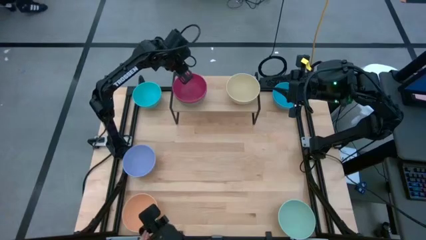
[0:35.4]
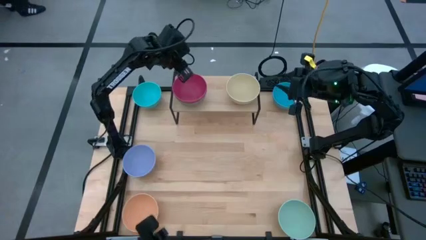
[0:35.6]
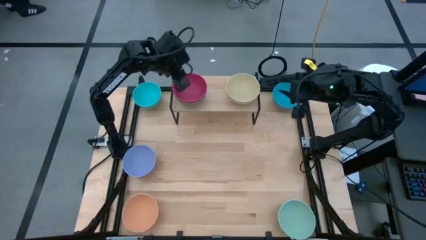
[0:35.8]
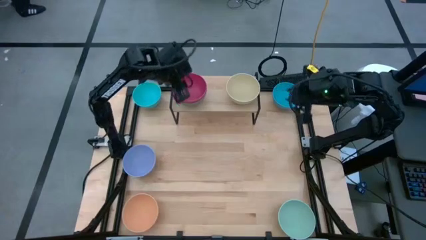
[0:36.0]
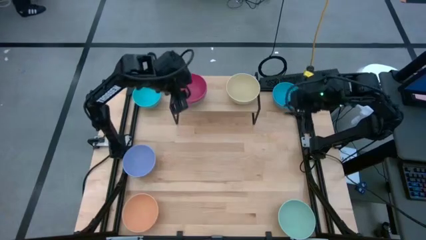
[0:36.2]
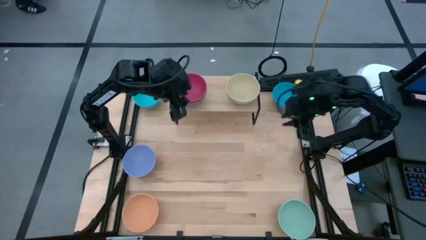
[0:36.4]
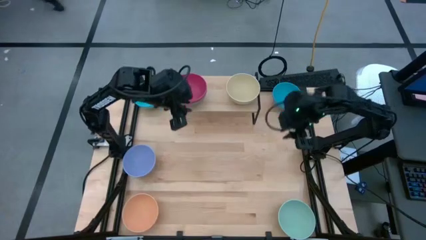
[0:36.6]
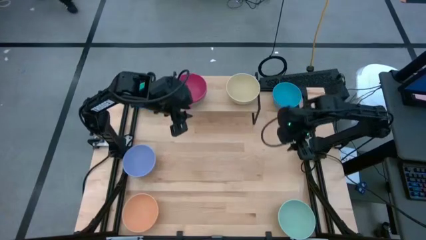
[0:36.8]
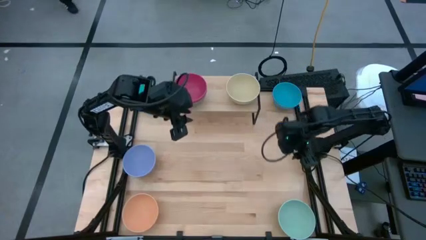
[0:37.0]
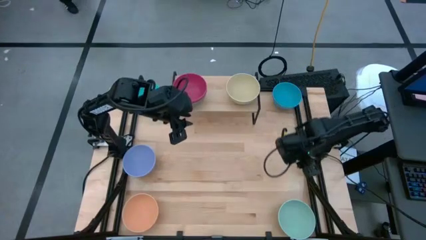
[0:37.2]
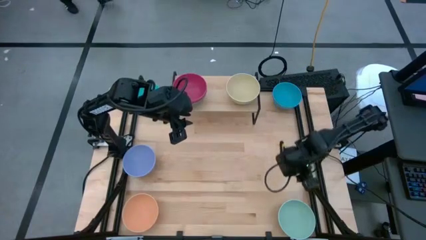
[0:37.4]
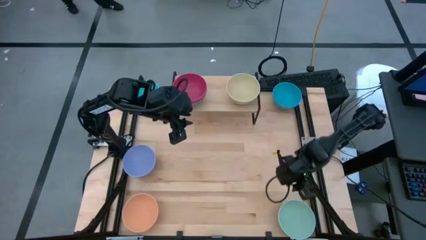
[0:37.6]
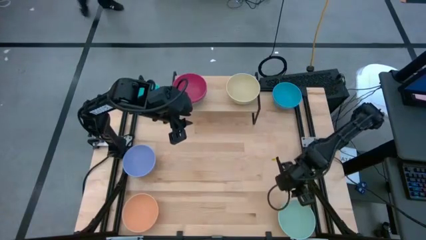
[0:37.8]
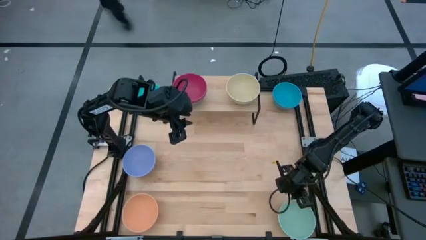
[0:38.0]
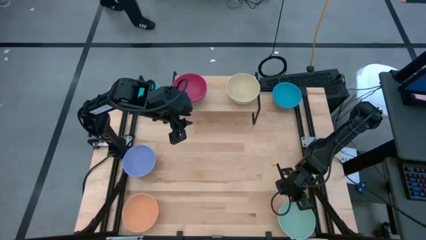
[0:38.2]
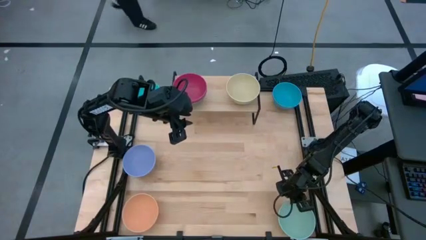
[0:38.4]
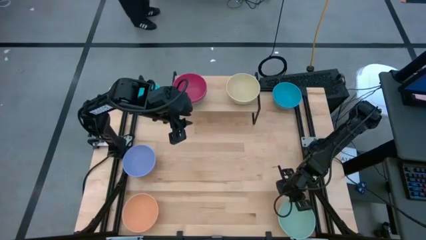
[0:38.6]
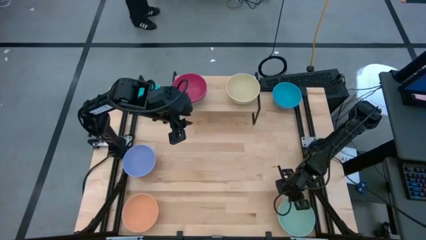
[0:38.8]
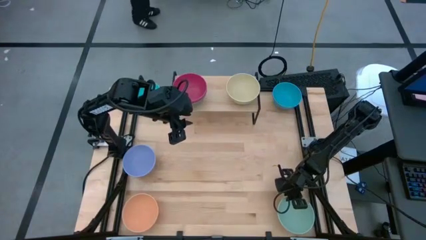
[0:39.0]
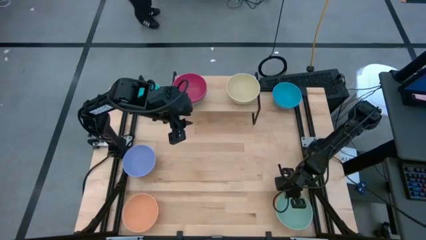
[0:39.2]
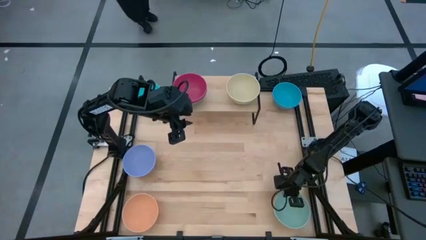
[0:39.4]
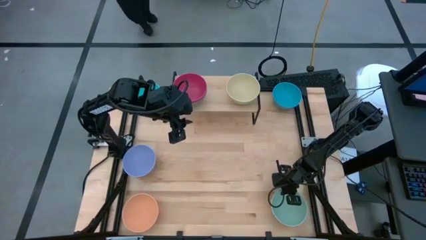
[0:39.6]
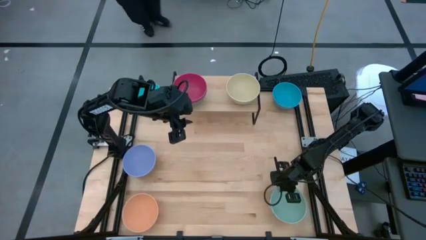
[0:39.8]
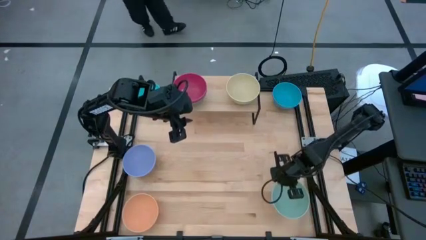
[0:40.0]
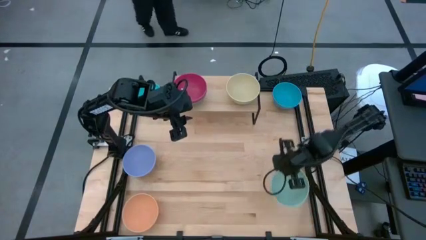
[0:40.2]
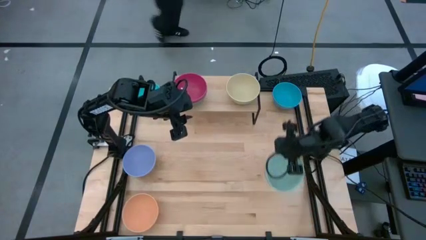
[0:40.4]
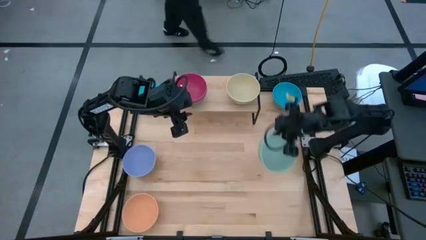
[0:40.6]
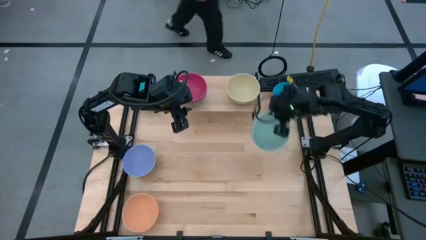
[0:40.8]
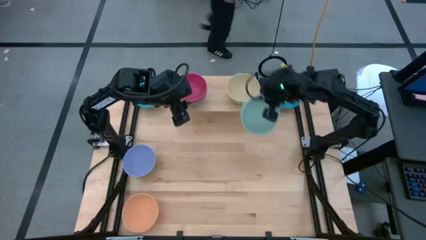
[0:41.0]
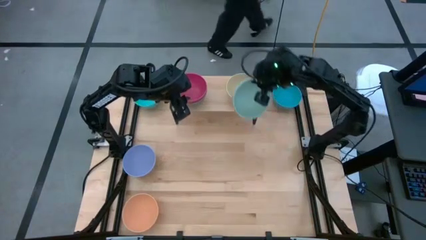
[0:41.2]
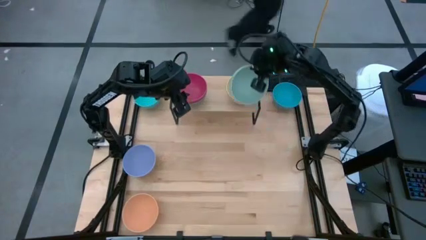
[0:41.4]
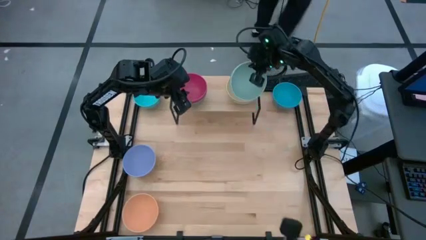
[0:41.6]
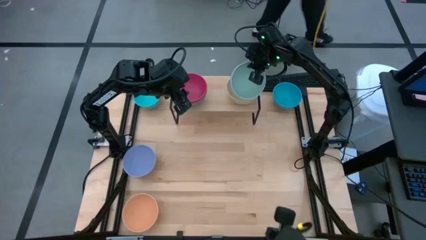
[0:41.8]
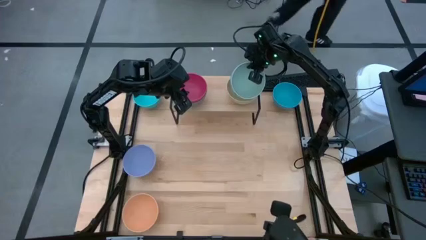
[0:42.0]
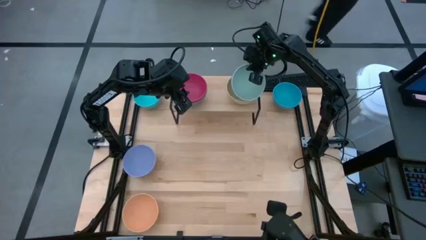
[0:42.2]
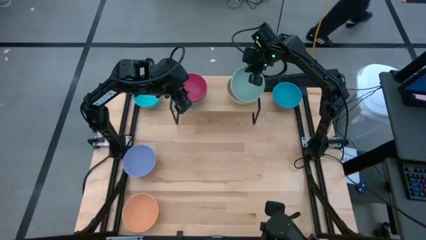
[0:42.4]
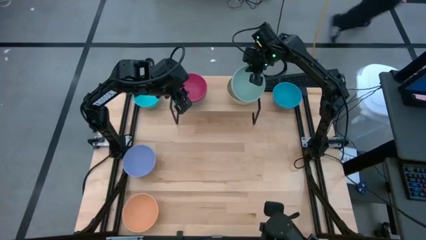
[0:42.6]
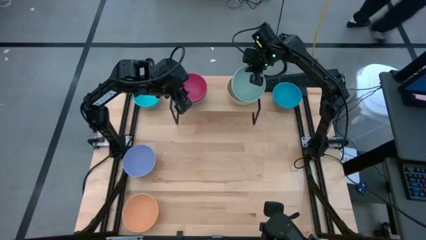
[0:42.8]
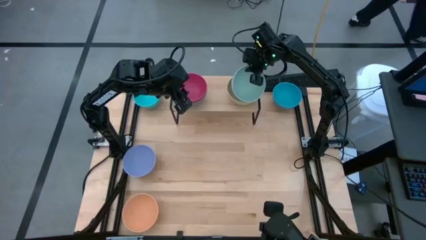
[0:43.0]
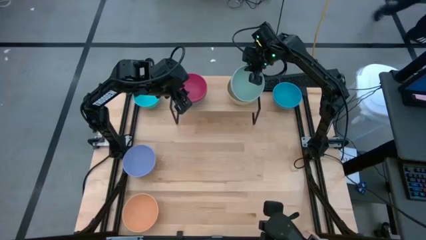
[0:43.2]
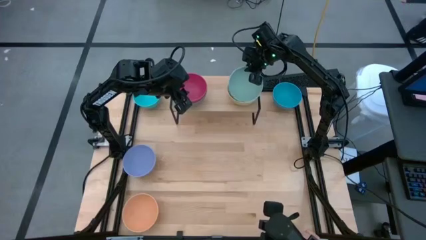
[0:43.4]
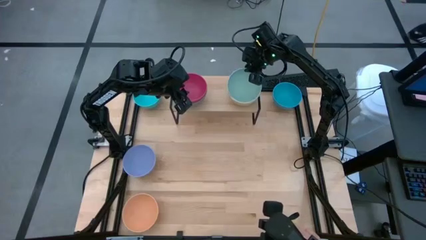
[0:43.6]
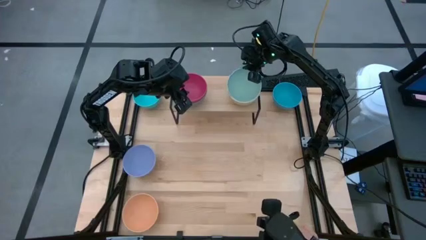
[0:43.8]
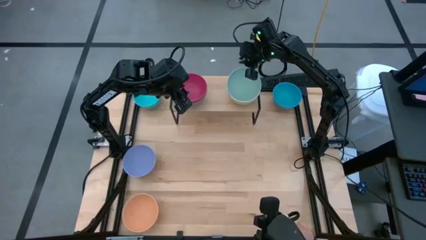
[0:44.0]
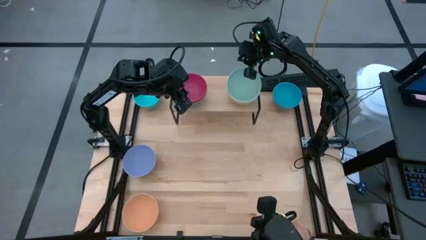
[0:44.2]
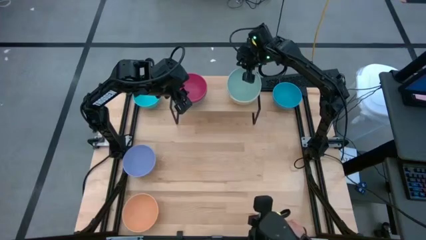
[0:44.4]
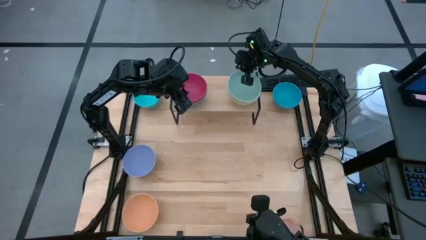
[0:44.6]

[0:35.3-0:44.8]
Task: Place and stack bowls onto a shelf
Stack the green bowl on top of the yellow bowl on the shelf

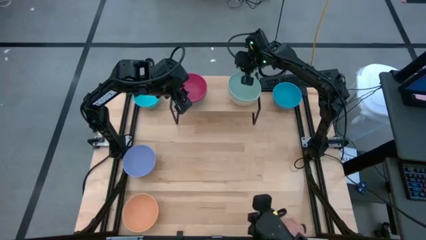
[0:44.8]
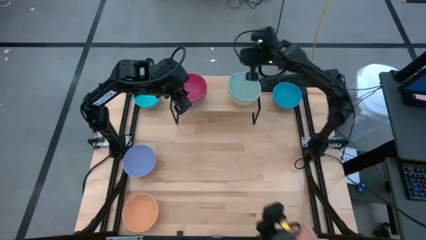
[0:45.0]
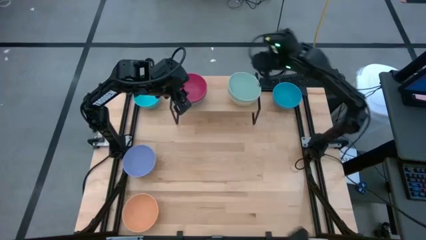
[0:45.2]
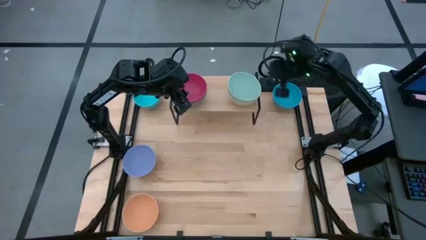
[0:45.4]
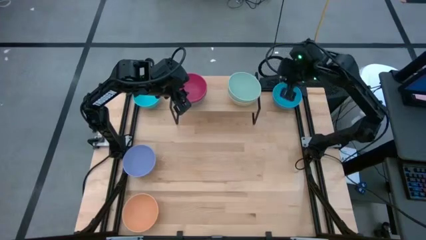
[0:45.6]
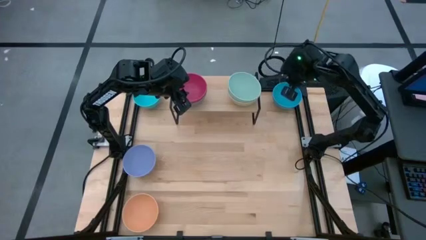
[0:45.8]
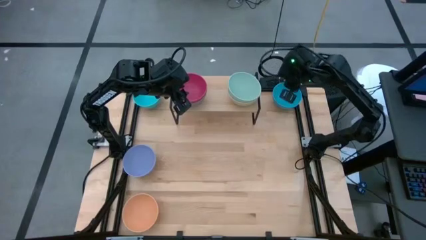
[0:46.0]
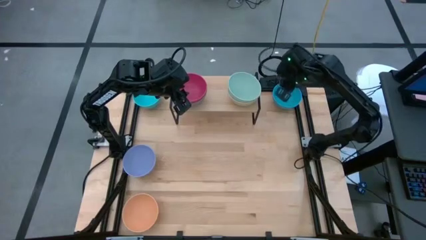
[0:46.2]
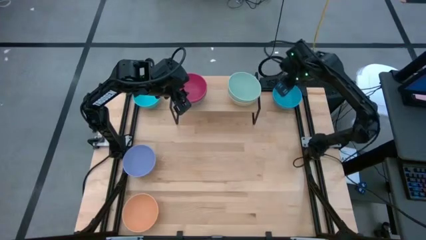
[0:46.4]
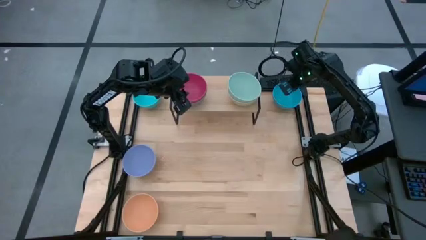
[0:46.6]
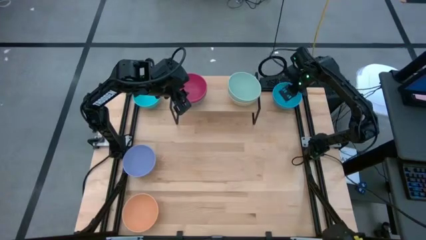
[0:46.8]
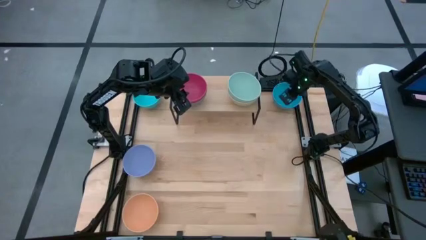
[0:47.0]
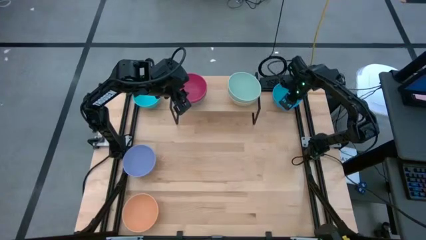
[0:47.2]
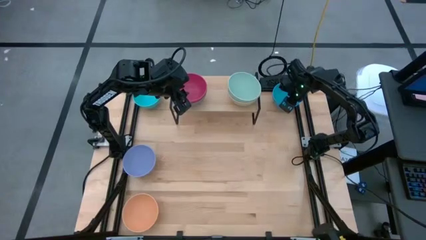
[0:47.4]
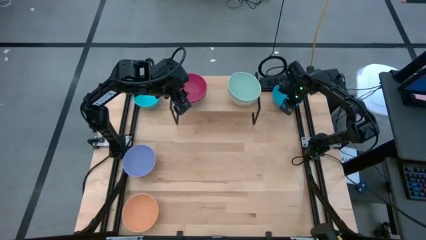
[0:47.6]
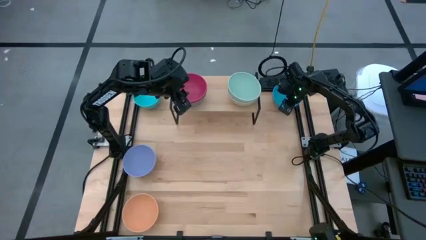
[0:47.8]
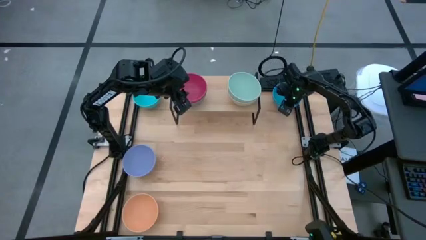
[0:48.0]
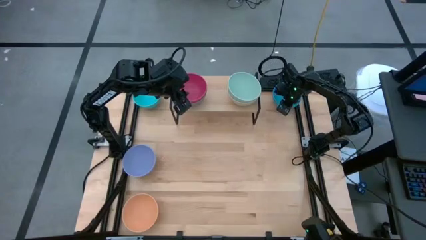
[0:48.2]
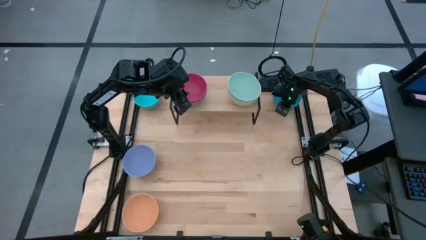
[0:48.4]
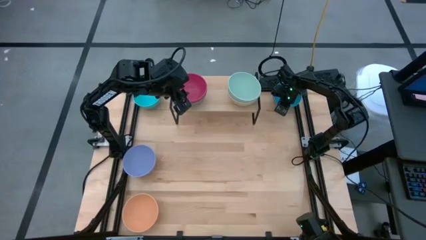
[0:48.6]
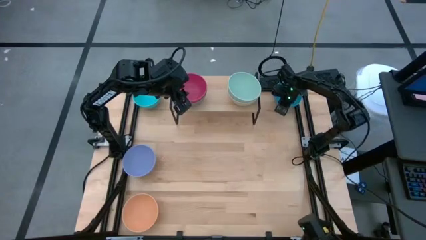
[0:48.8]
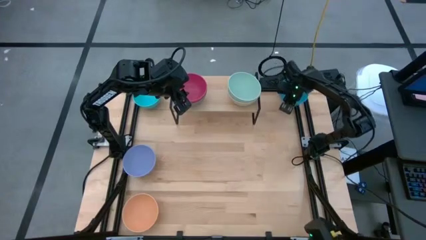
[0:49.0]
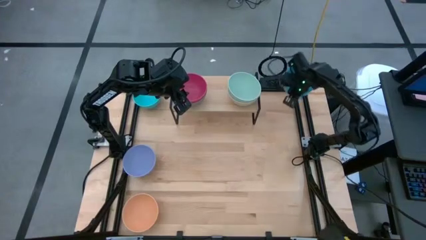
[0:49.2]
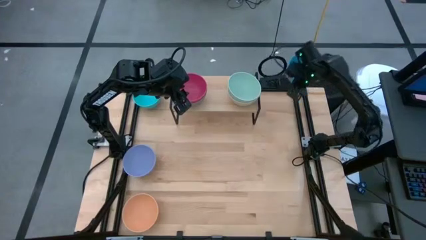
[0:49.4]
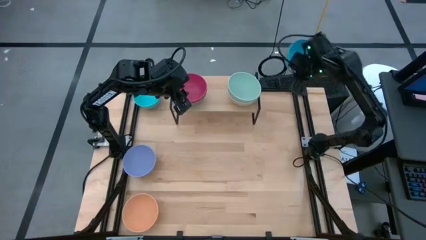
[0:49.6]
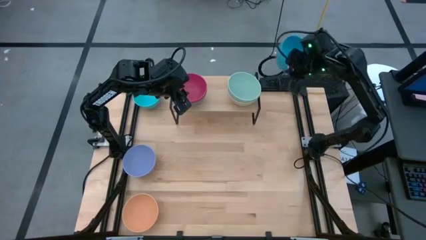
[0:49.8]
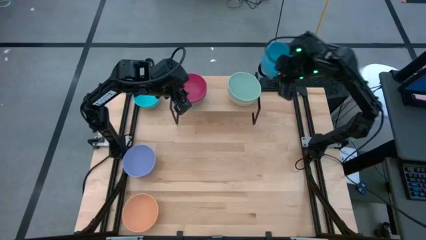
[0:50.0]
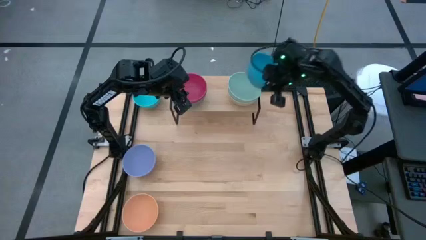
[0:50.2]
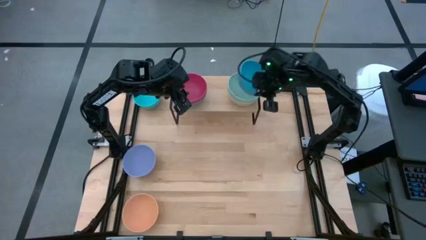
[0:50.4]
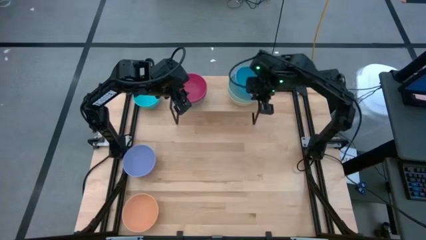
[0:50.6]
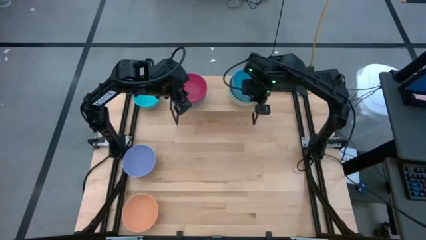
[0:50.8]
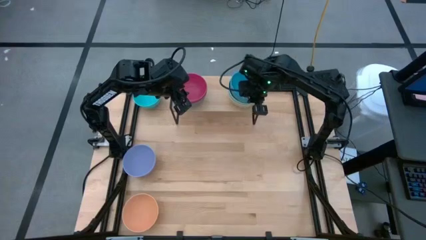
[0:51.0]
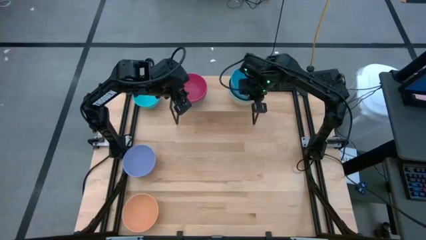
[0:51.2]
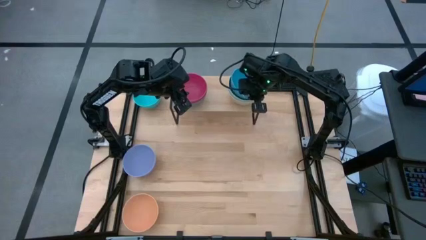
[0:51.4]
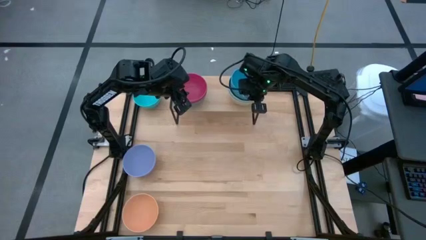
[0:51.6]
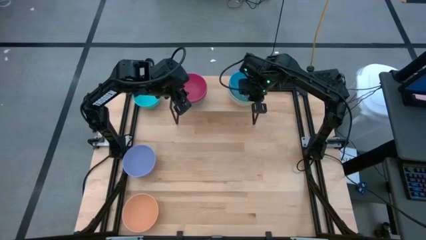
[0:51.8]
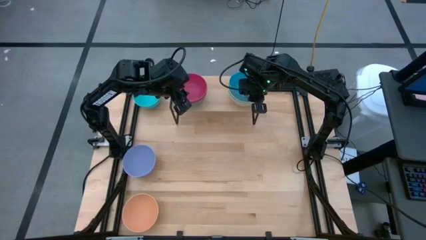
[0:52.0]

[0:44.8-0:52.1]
Stack the blue bowl on top of the green bowl on the shelf

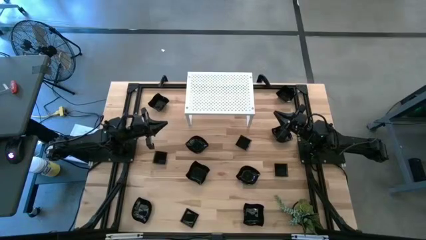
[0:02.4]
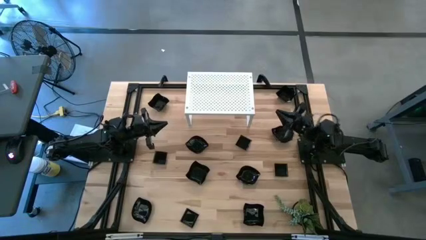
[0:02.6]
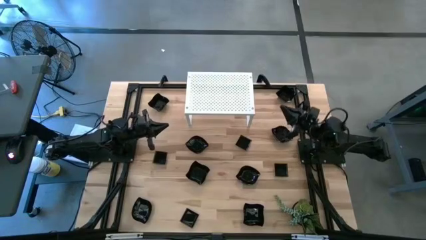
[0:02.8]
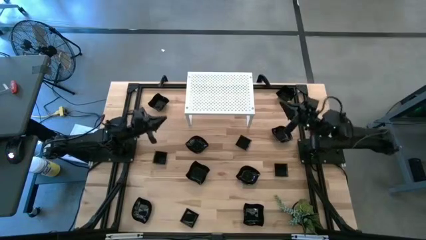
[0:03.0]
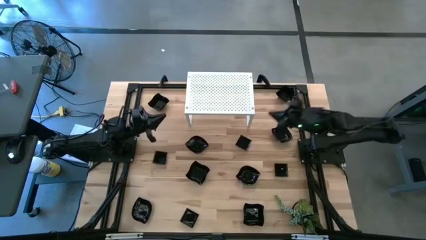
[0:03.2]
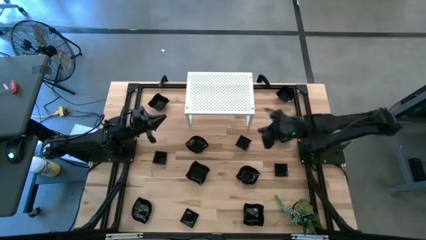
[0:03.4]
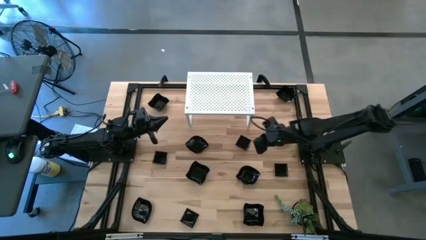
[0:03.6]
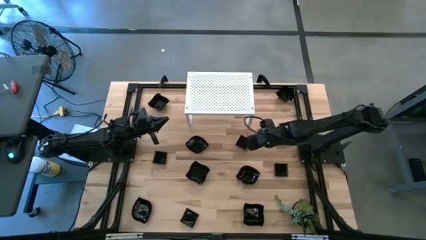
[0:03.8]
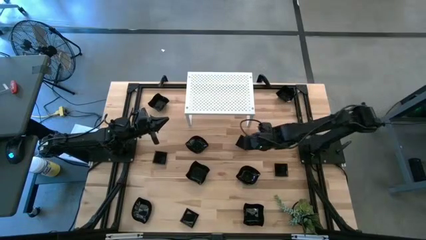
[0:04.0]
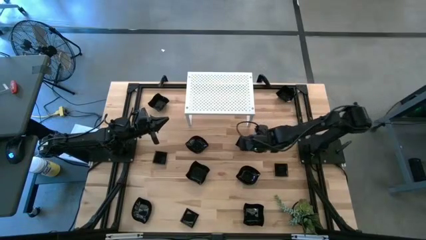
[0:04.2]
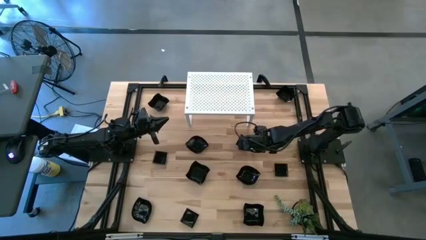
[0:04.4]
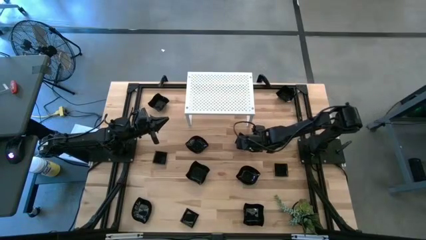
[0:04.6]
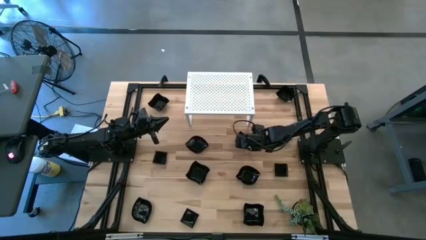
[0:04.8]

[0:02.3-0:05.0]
Task: Pick & Place Mini shaped plates
Put the black square plate on the shelf
